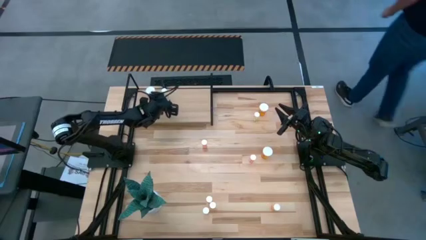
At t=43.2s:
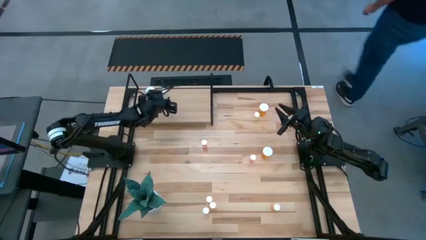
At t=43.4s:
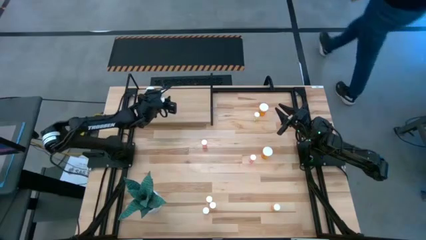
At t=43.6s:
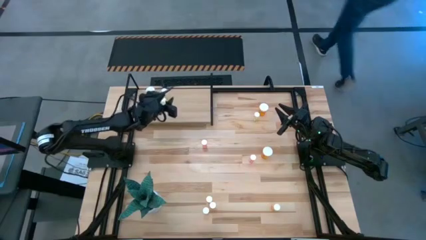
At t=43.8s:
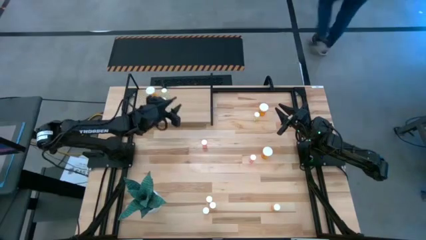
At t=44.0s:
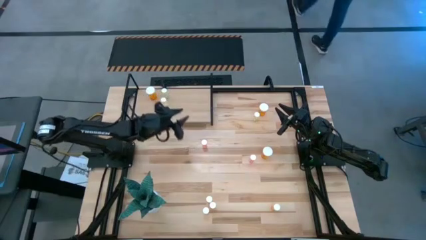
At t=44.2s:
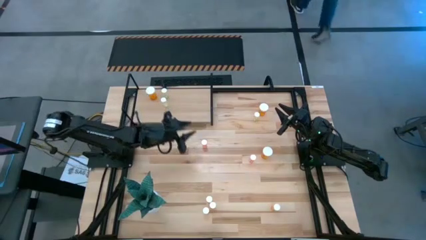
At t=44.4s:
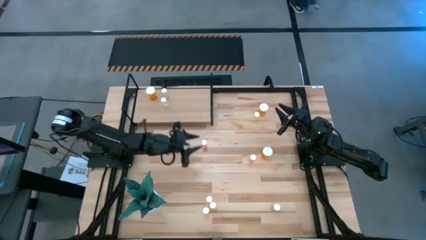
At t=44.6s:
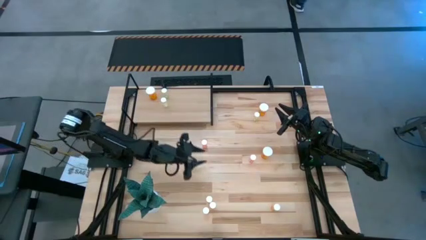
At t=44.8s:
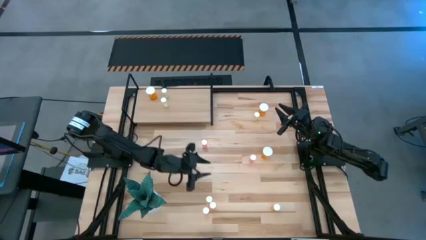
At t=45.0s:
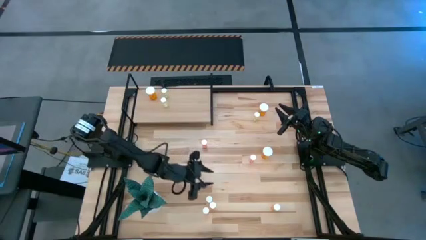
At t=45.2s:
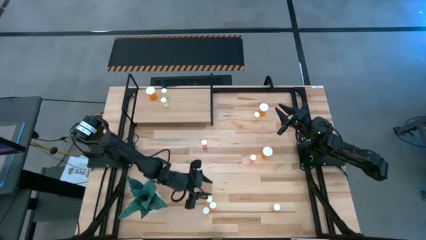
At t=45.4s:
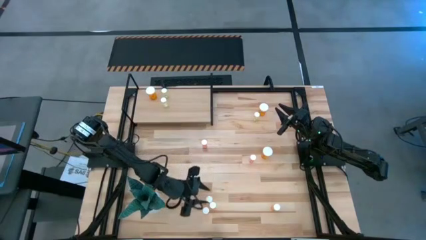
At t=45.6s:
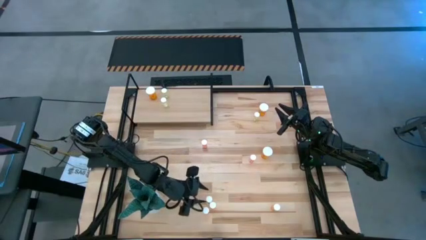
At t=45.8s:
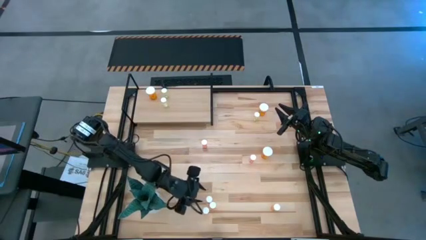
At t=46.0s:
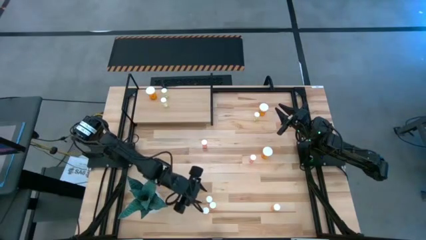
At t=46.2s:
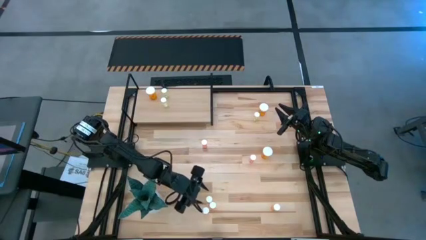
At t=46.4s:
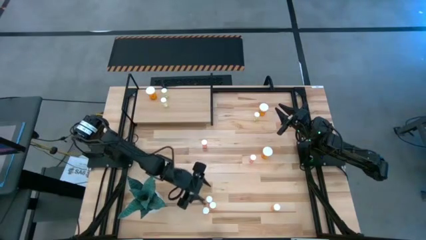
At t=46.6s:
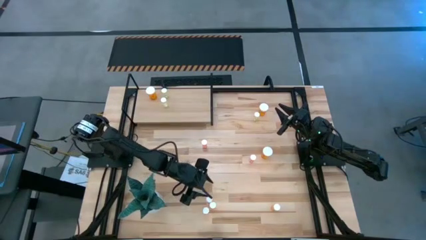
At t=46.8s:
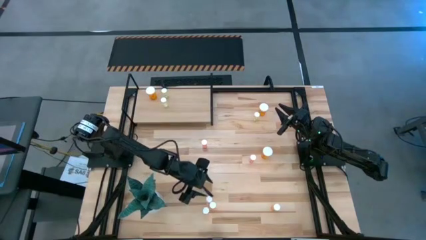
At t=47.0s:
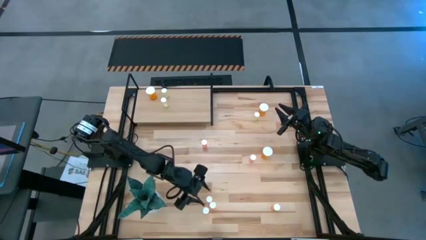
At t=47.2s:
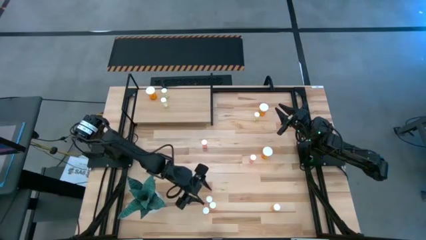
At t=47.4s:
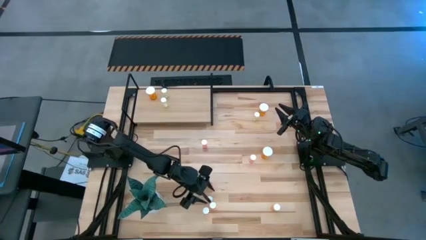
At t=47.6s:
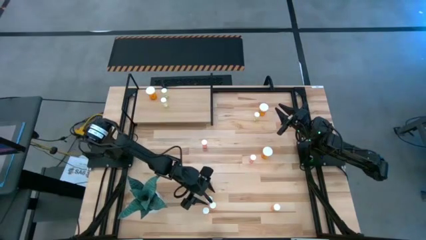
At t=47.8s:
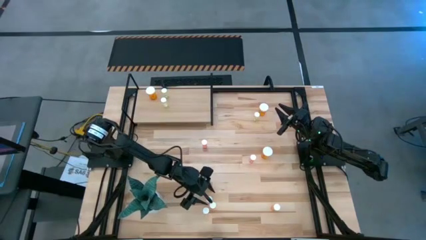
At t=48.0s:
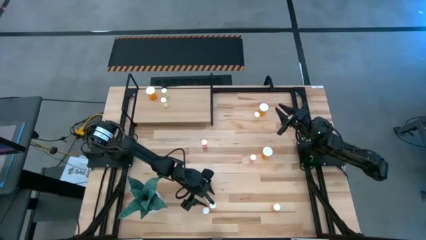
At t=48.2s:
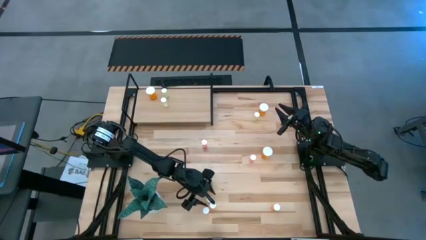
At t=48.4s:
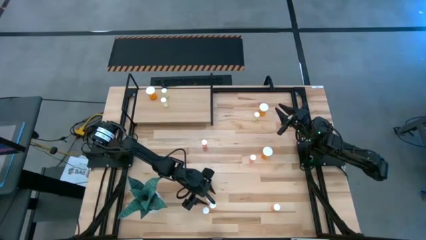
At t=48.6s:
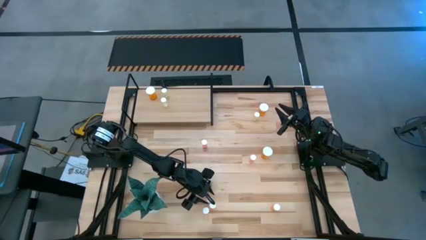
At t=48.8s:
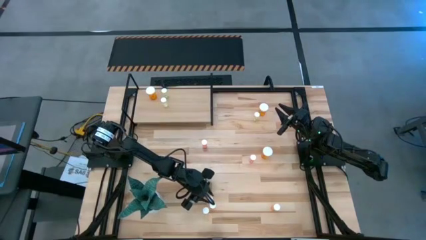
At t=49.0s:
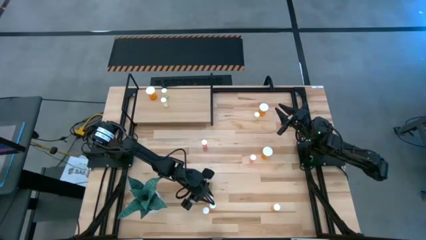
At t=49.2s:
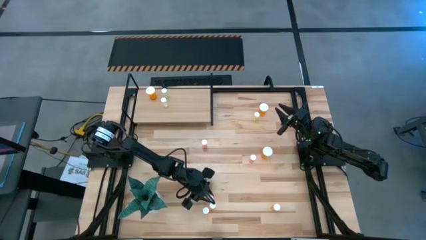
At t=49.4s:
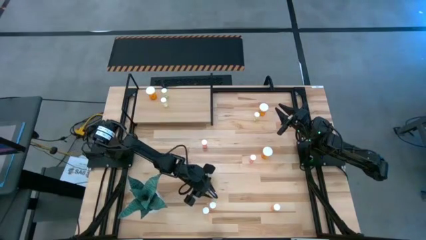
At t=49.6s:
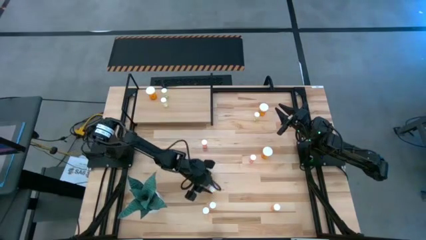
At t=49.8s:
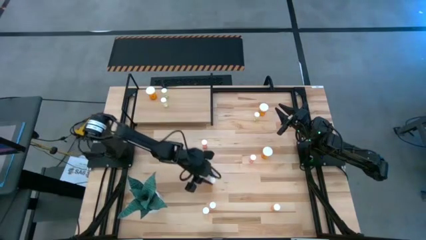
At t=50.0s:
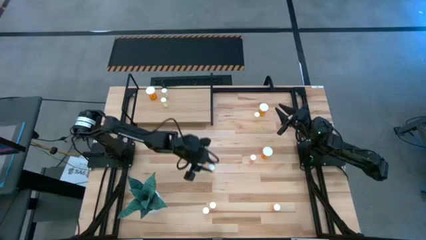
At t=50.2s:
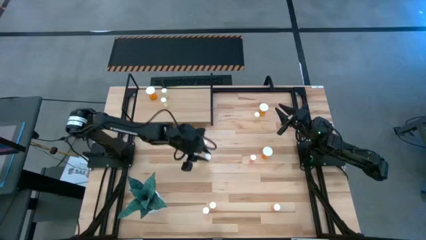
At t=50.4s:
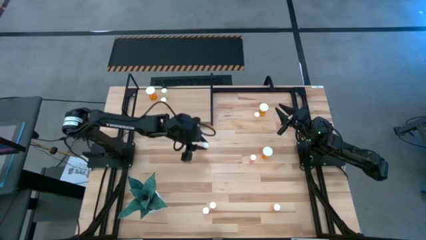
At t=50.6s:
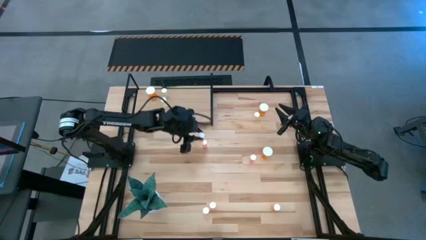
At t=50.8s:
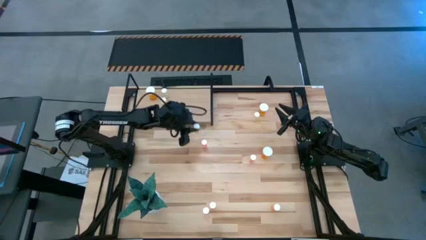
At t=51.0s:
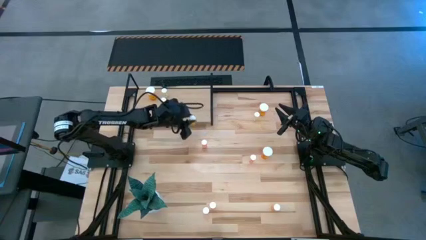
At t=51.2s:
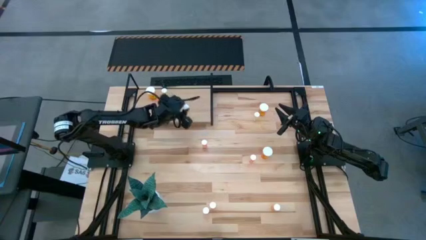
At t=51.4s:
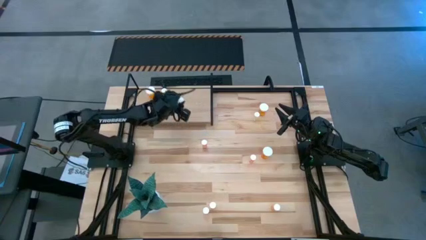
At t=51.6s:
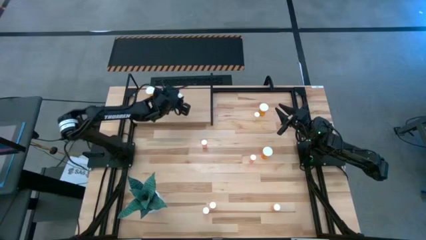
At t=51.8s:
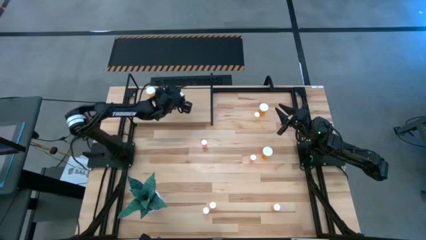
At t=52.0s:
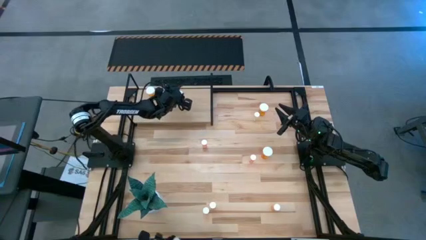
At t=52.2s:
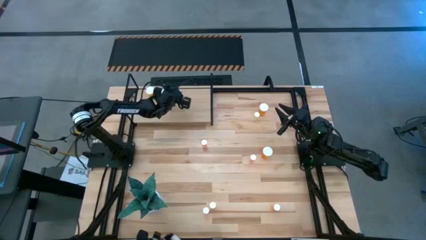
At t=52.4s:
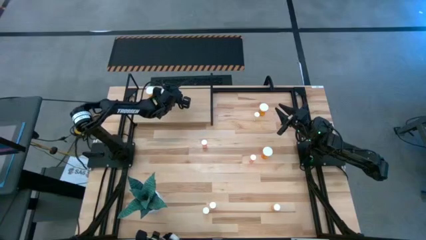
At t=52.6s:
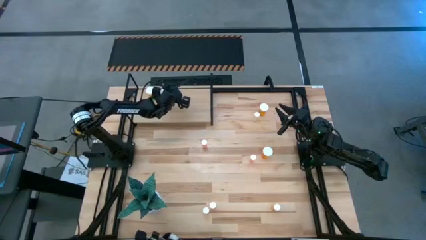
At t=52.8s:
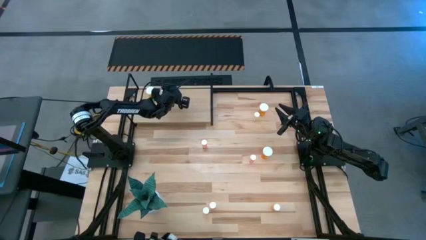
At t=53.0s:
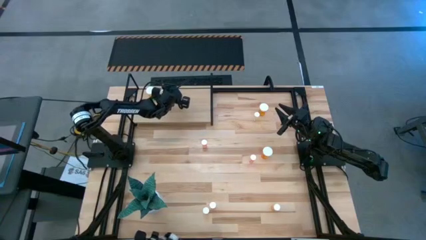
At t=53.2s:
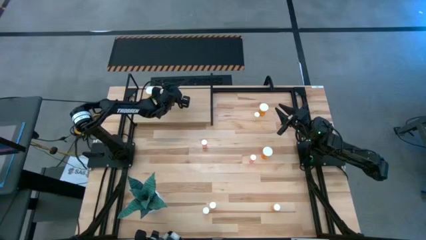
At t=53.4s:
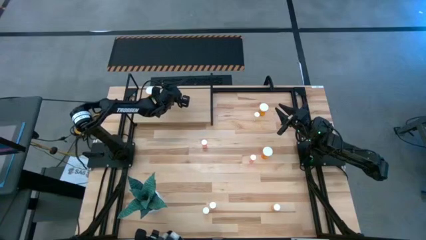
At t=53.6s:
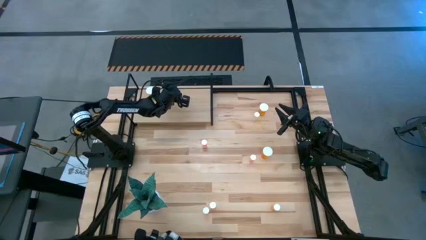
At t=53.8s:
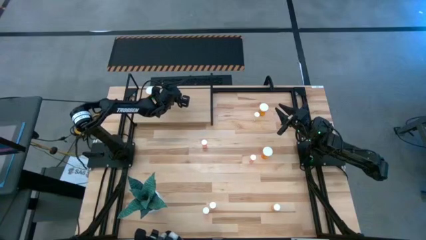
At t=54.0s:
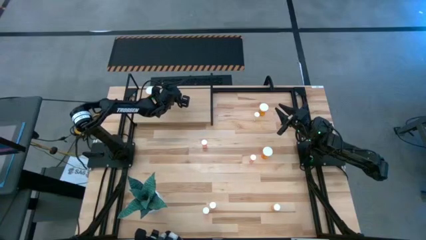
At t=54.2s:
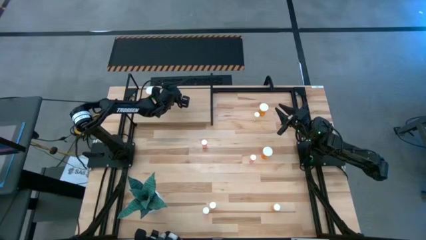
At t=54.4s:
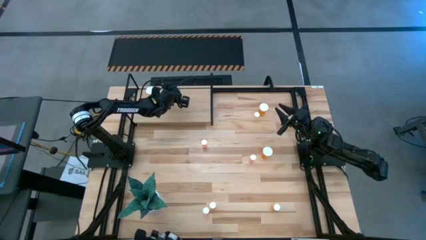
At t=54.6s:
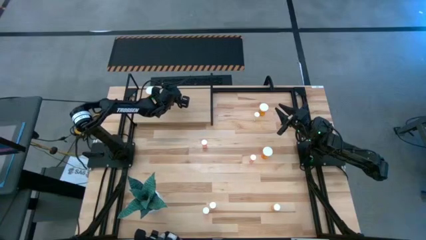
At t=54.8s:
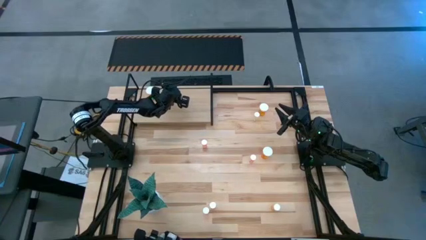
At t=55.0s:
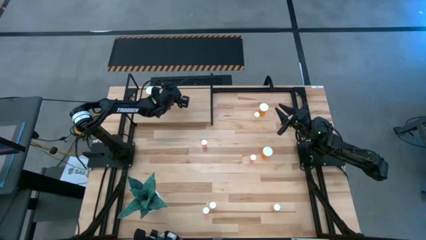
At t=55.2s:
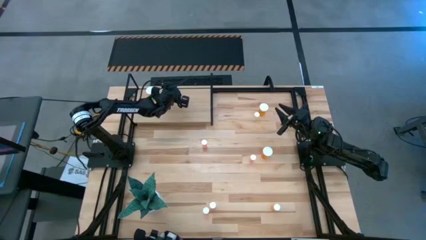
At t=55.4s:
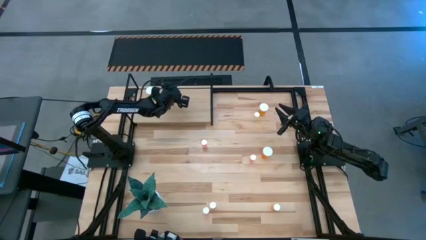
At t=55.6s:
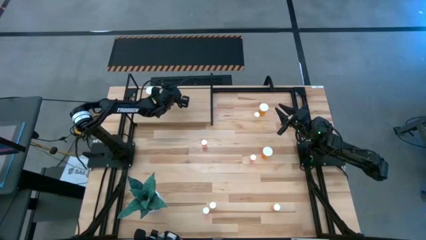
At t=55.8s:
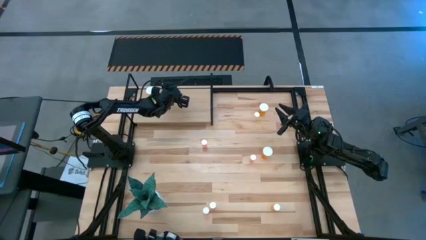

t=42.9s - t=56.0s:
Task: Pick and place medicine bottles onto shelf by color
Put the top small orange pill bottle on the shelf
